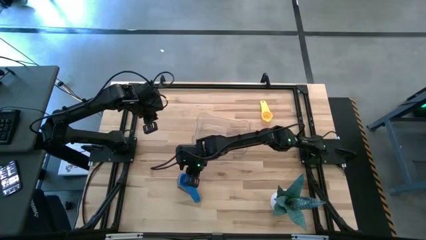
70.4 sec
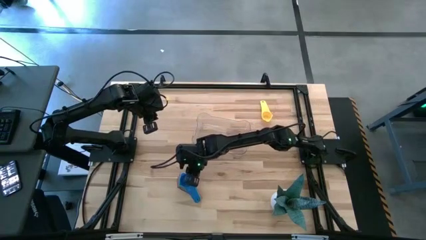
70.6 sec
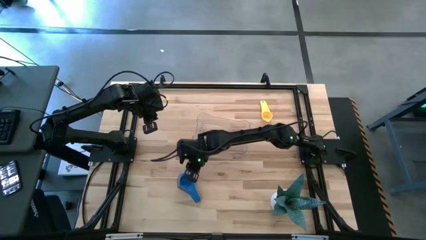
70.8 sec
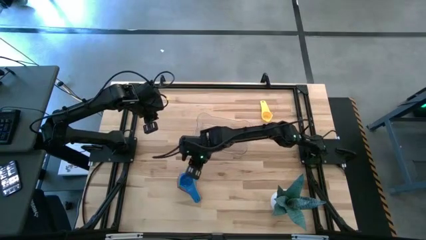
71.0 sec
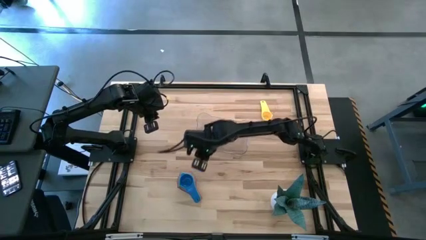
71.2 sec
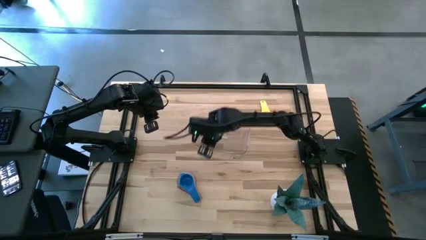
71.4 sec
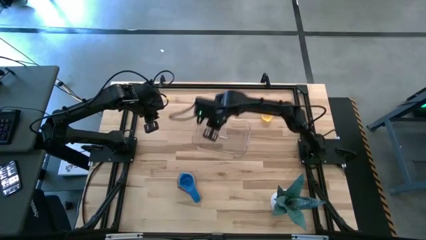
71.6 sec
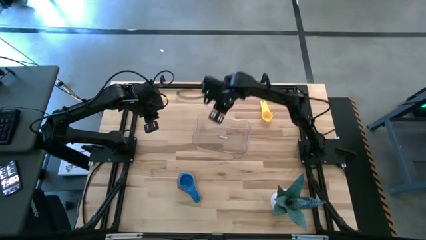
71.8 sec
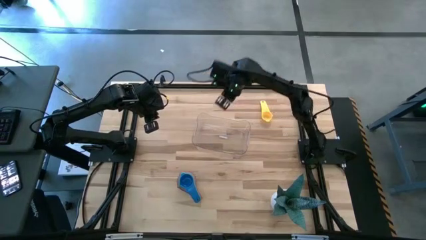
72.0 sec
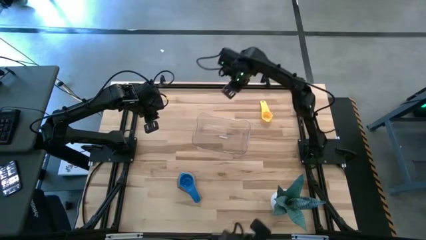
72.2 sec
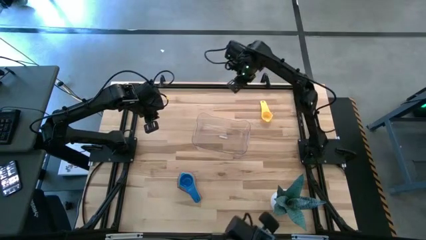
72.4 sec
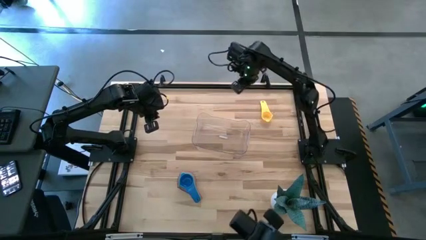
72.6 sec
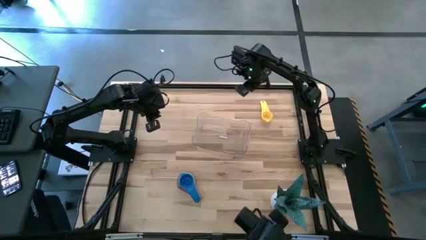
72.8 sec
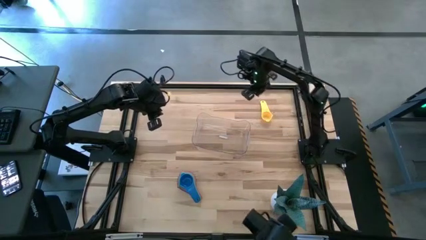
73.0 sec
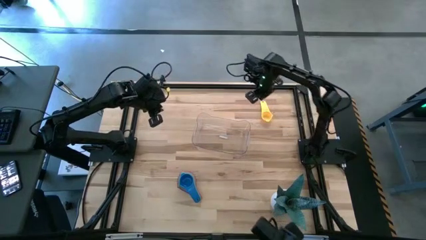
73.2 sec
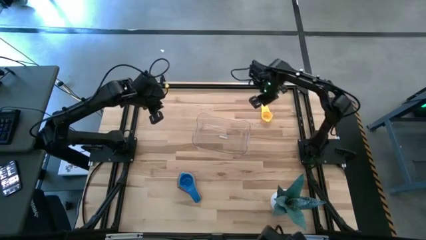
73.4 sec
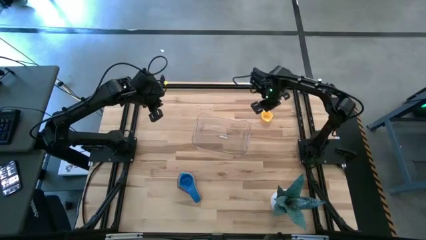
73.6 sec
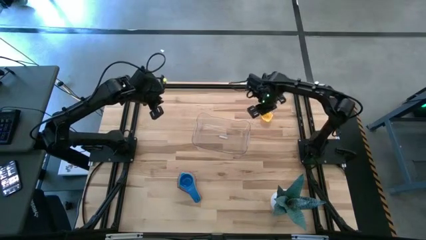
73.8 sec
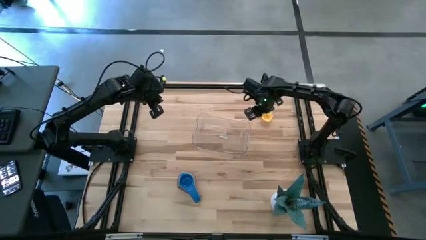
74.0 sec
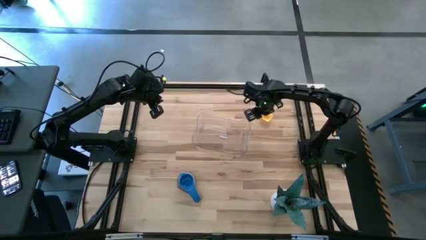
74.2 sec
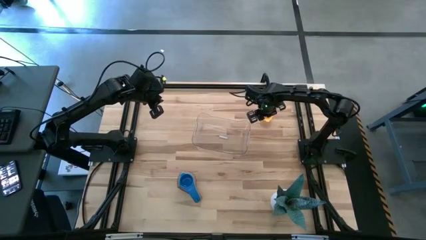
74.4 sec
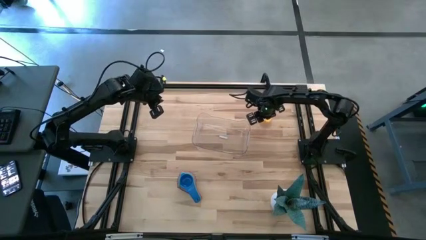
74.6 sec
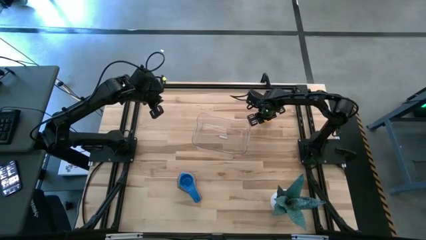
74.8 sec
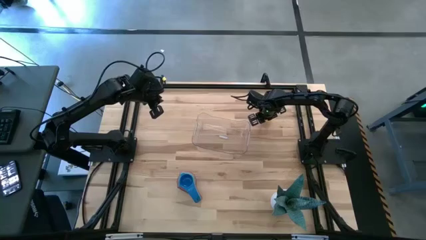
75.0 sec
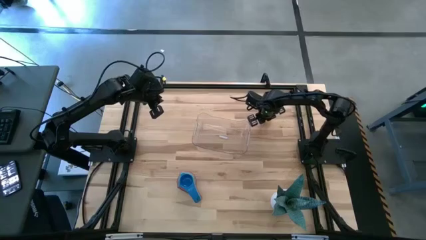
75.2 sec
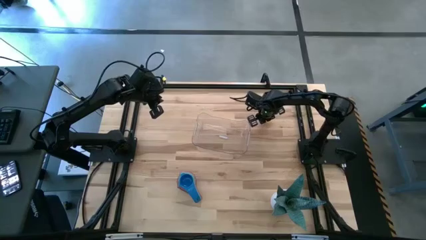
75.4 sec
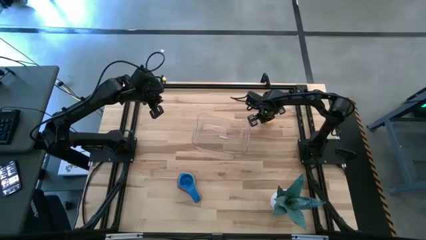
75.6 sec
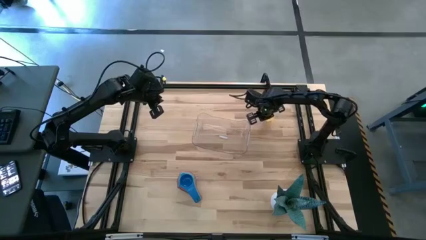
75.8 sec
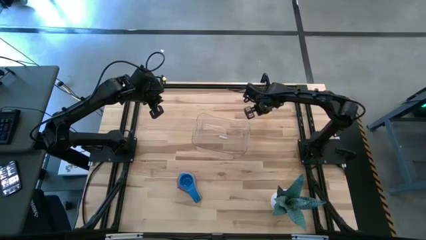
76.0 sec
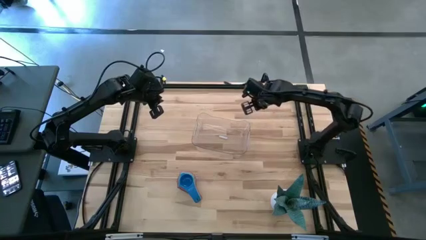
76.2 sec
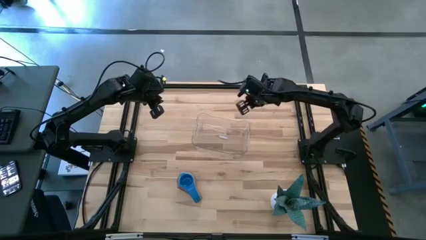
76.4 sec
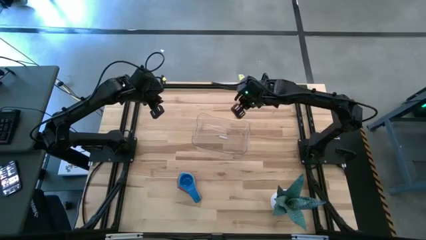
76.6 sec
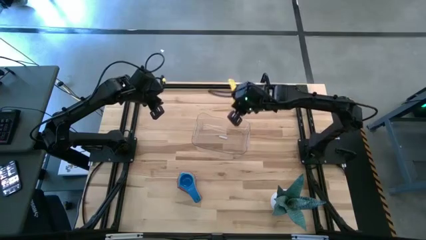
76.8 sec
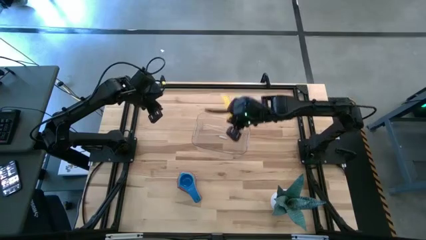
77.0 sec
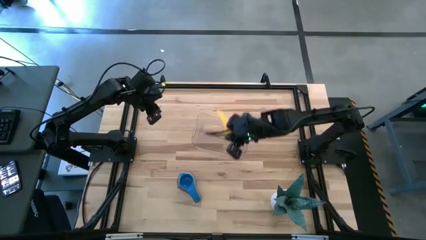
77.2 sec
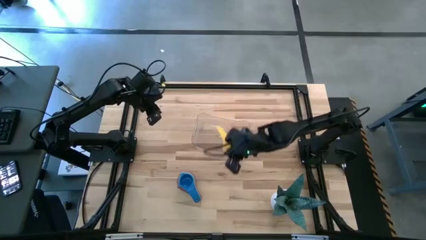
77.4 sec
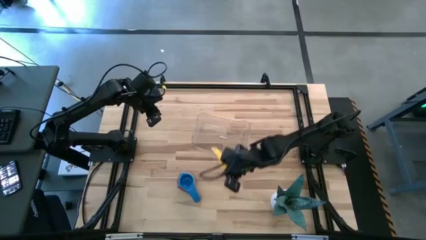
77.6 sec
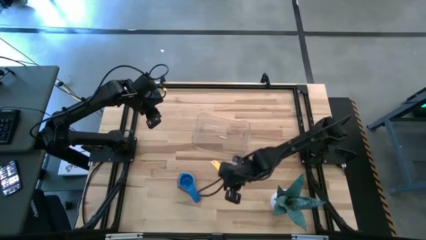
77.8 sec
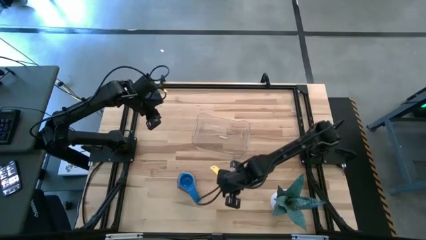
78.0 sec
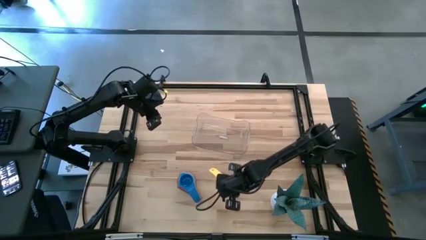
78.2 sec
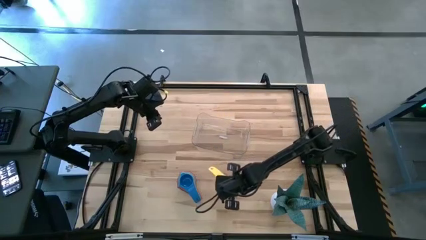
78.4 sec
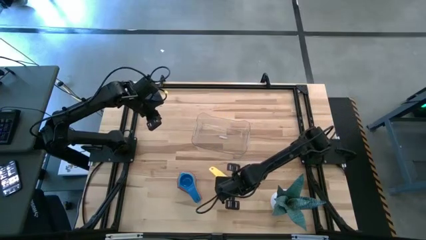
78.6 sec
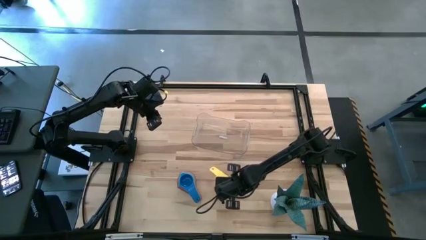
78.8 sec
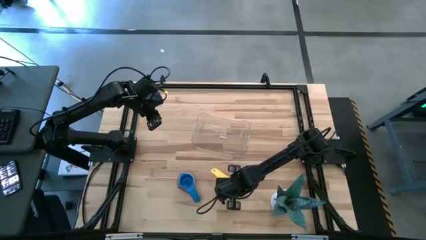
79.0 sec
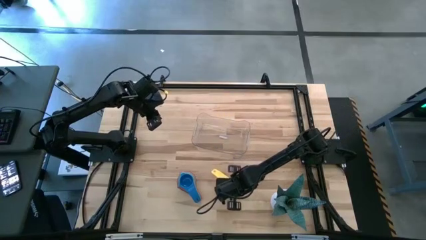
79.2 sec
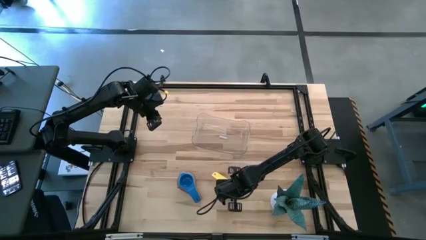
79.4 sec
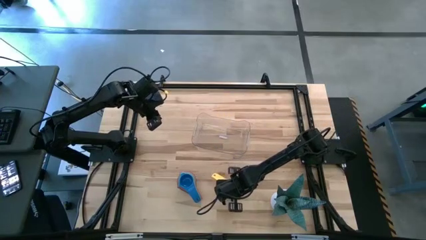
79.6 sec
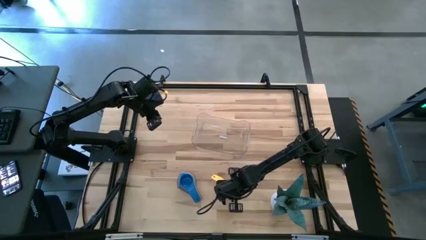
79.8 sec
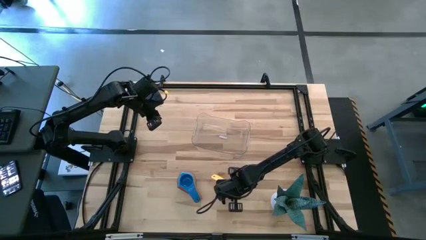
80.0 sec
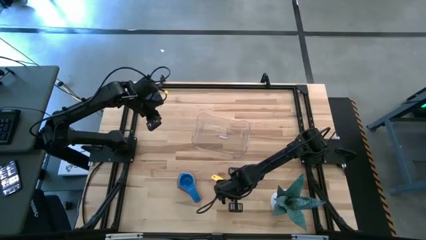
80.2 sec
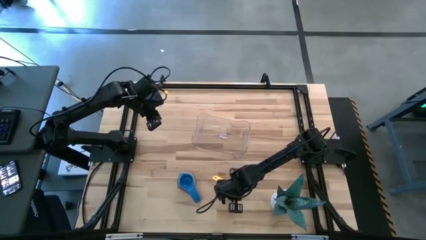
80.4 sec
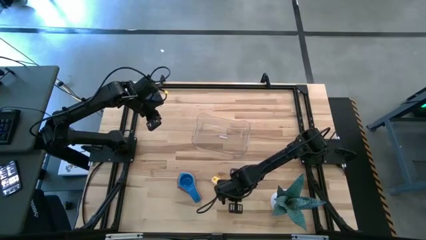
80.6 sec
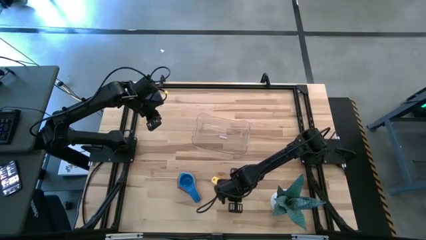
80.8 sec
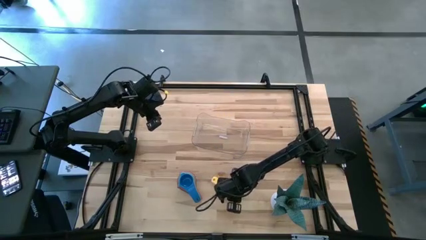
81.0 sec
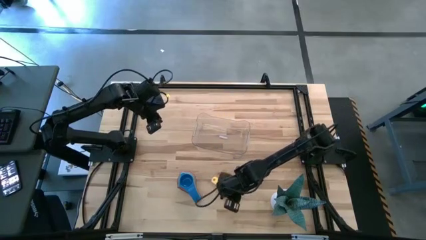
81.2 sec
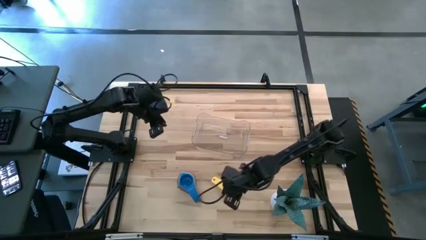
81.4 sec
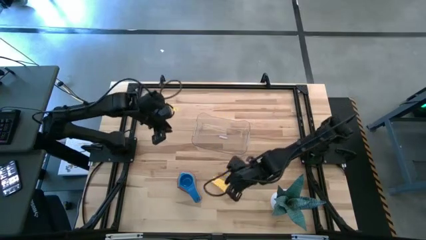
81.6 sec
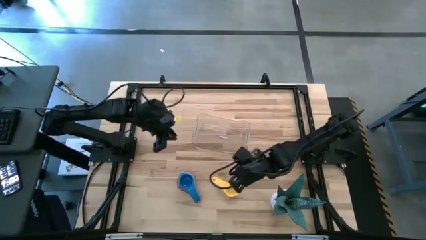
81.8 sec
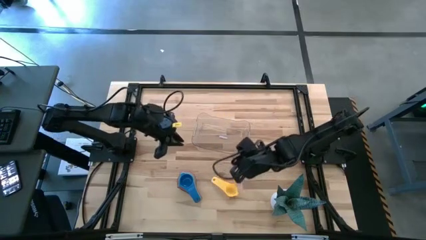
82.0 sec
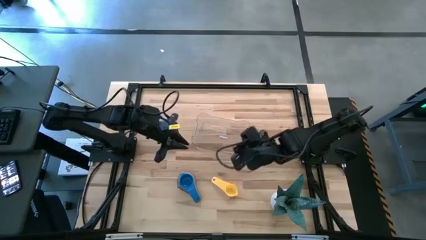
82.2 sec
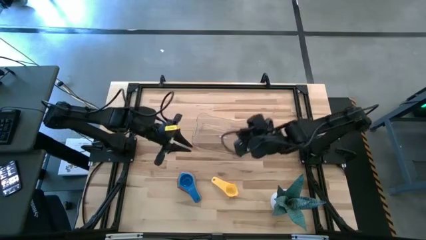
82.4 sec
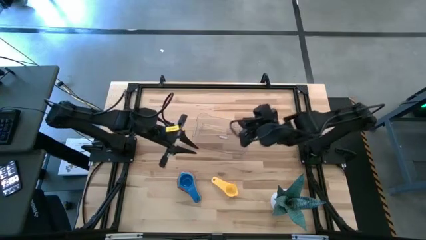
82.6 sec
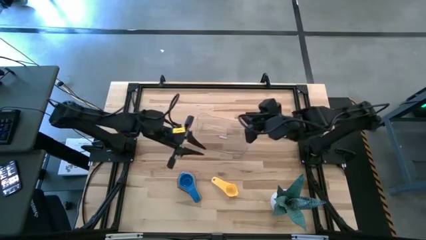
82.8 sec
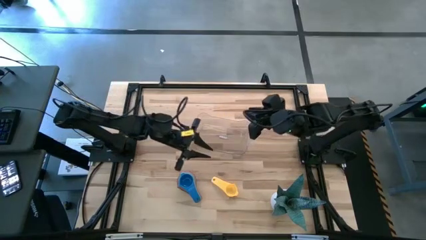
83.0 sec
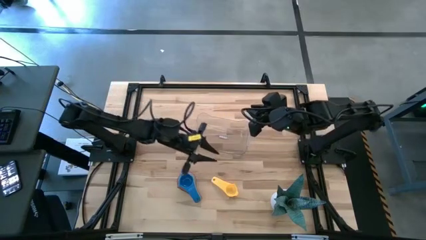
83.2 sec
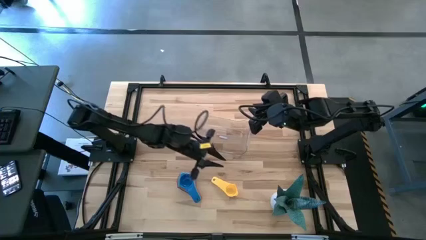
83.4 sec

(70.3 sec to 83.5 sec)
Task: Nest measuring cups in basket
Stack the yellow measuring cup on the dark blue measuring cup
